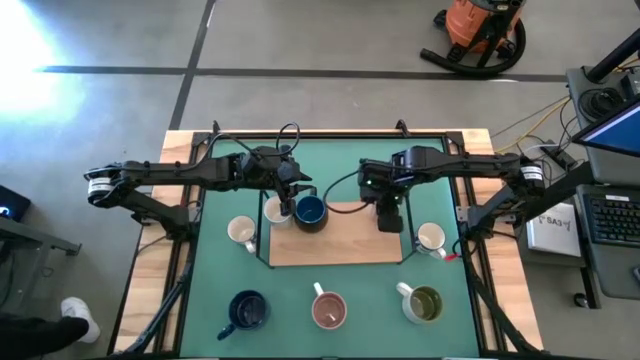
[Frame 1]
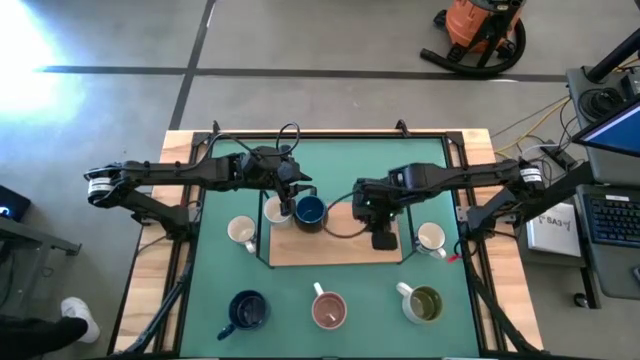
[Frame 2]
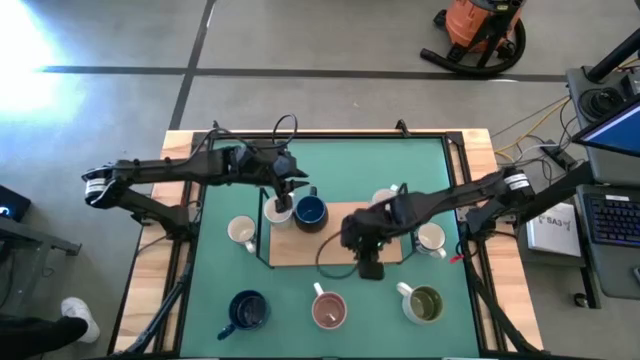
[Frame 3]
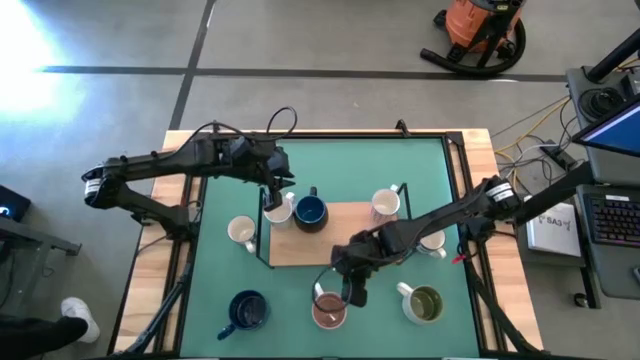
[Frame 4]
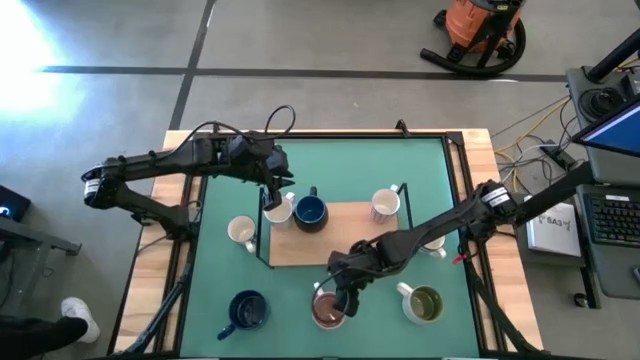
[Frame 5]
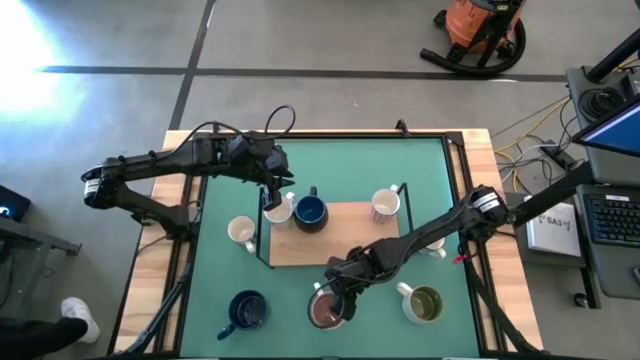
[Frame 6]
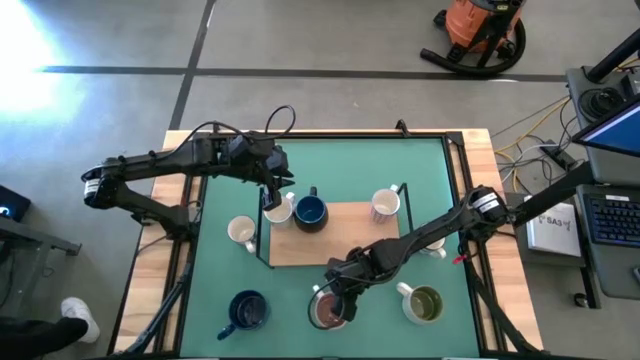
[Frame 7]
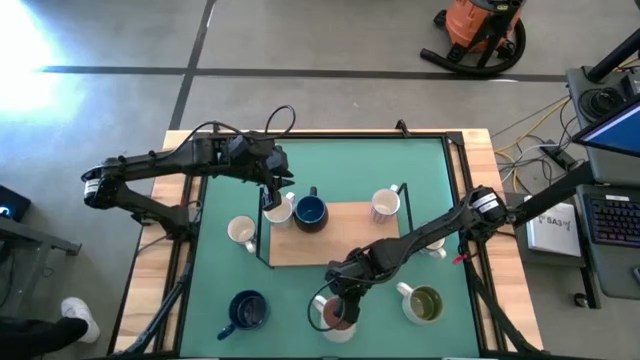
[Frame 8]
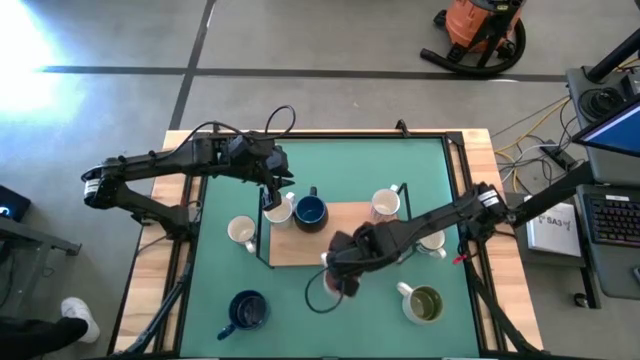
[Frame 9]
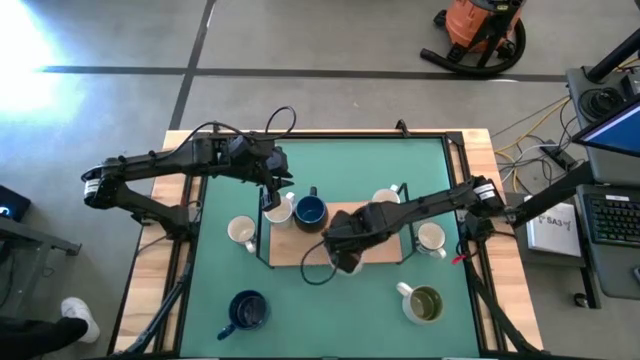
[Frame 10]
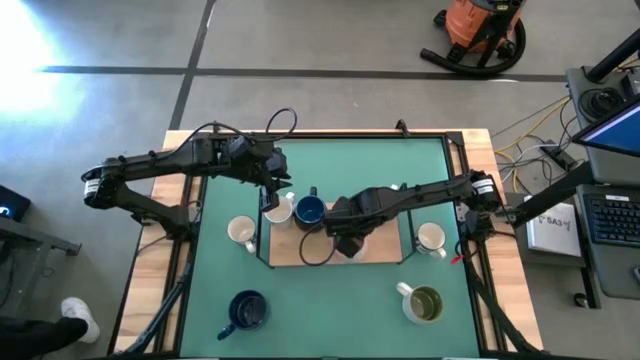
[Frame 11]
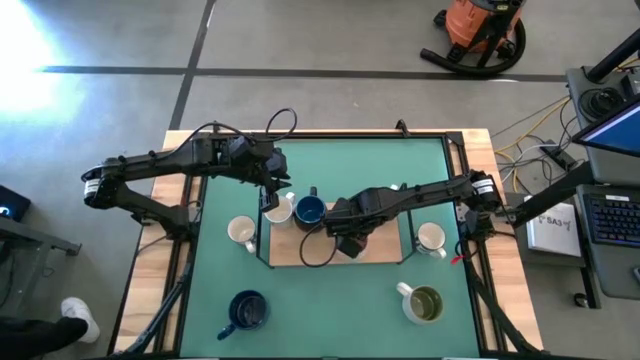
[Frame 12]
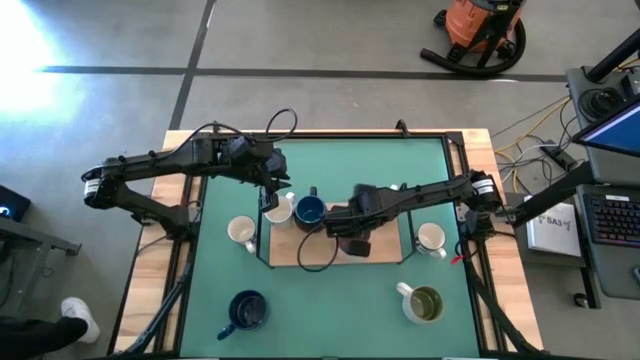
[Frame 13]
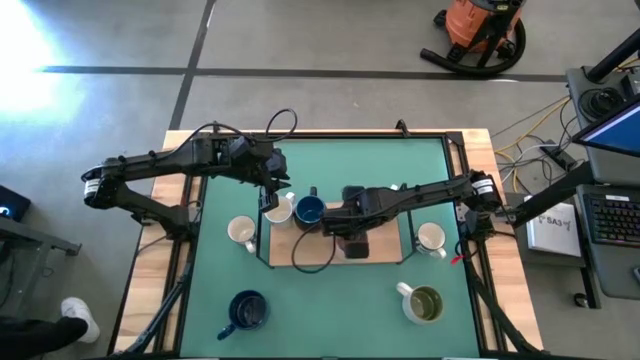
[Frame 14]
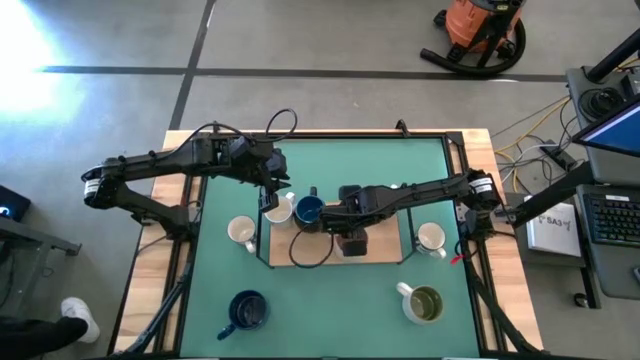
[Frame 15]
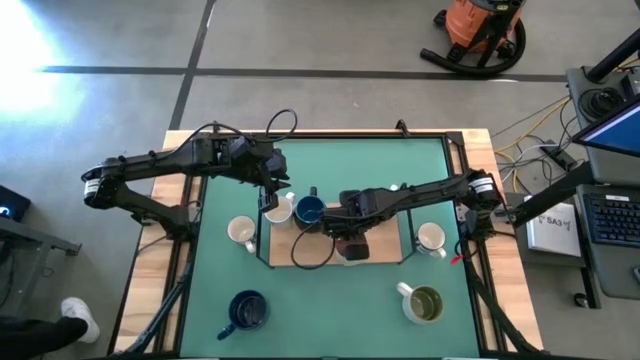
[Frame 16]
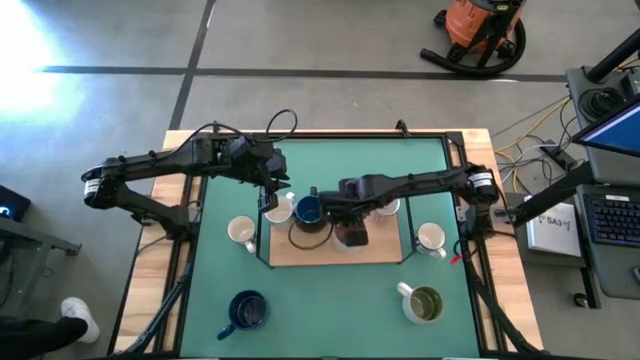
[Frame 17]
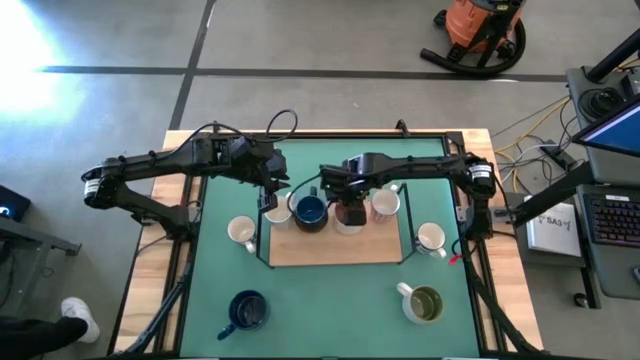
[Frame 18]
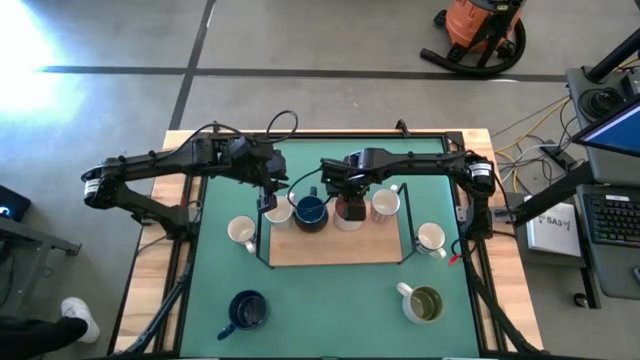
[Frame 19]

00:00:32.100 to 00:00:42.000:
Task: Place coffee mugs
Put the light orange mug on the shelf

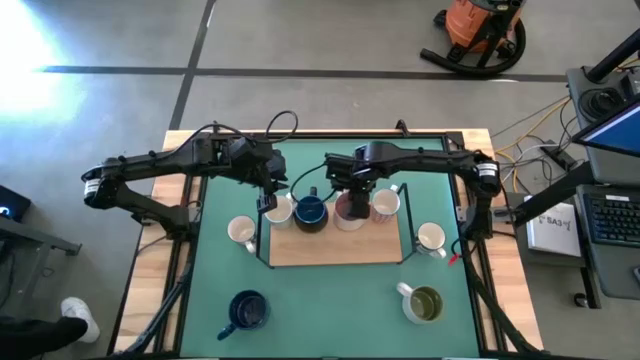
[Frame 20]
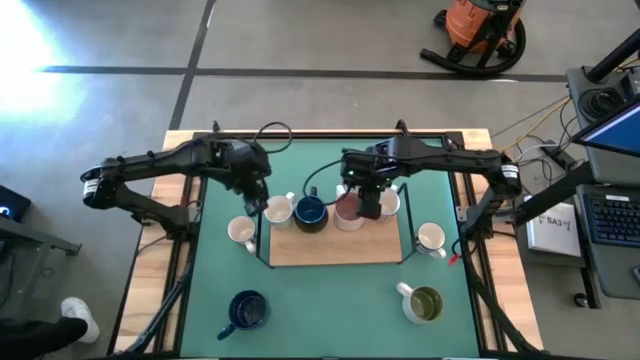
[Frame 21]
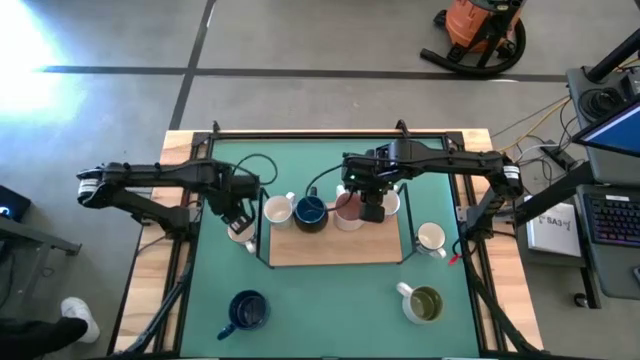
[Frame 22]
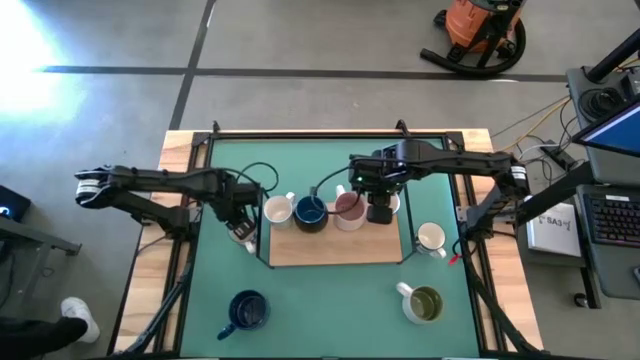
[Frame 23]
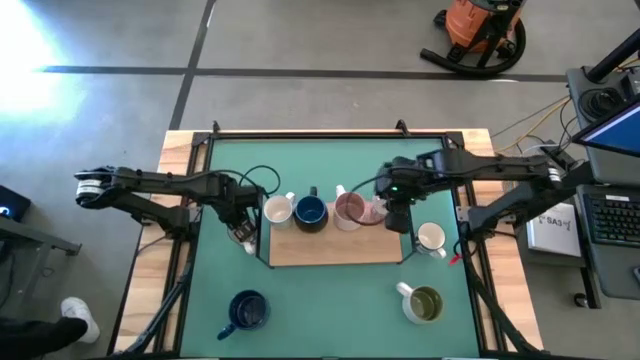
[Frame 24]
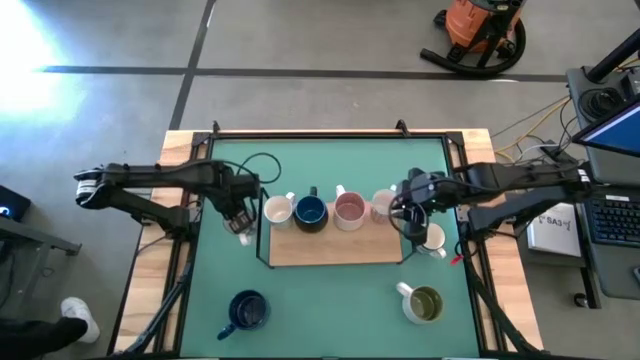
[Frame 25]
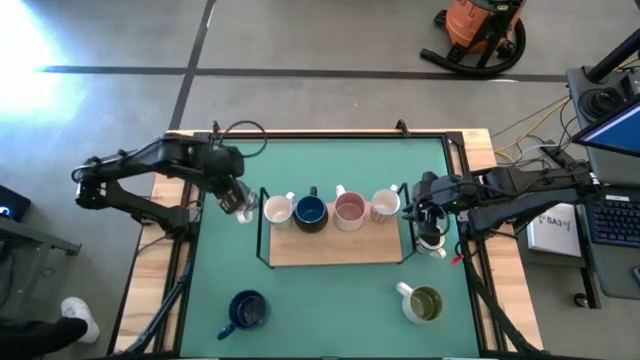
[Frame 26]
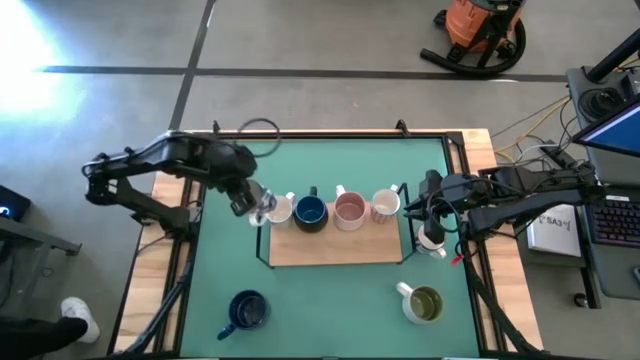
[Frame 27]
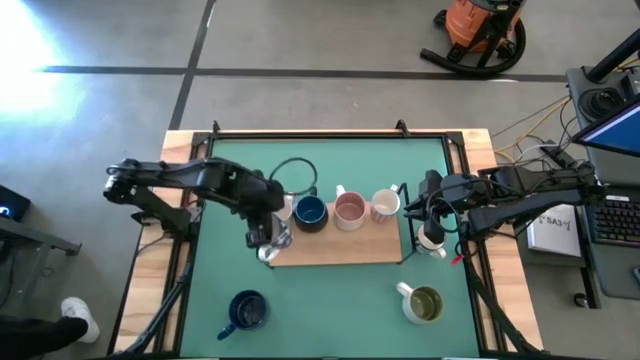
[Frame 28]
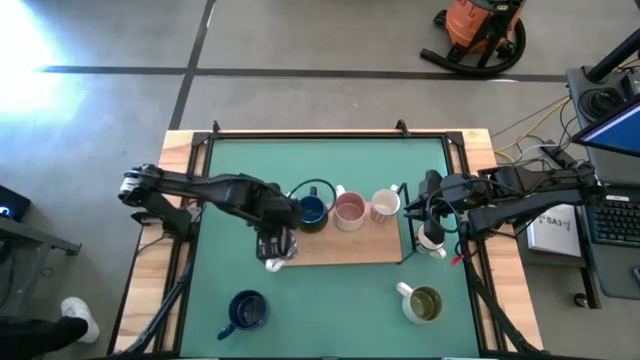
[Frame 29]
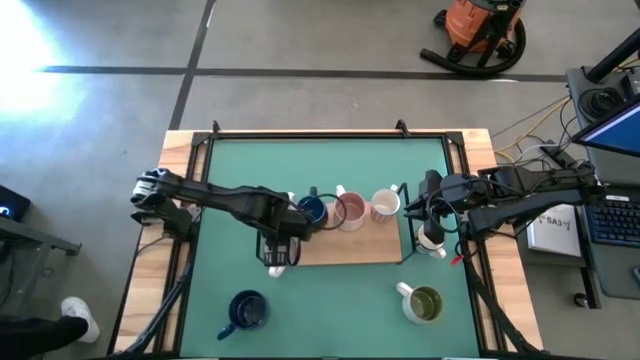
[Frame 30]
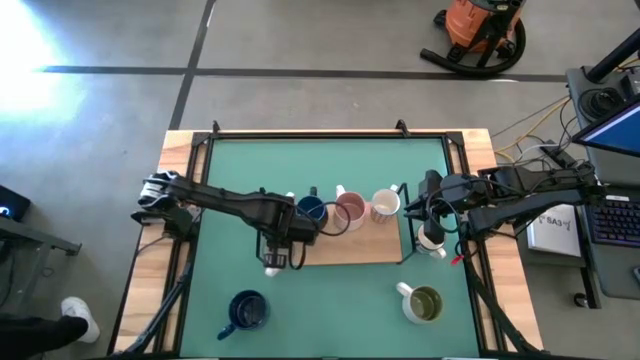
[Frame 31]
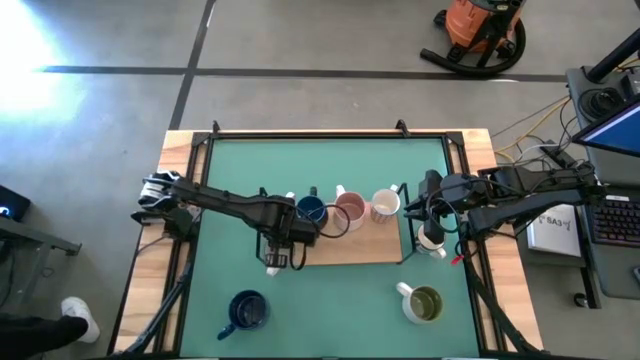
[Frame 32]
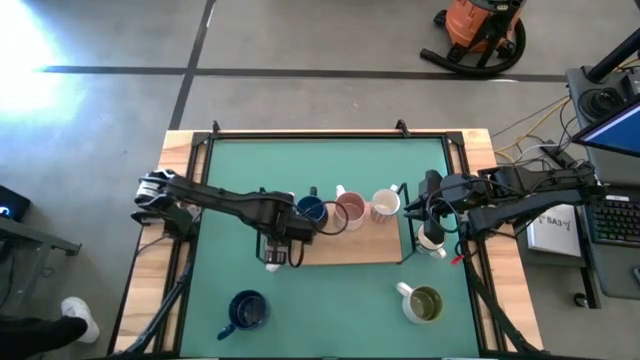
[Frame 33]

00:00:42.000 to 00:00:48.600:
Put the left blue patterned mug on the shelf

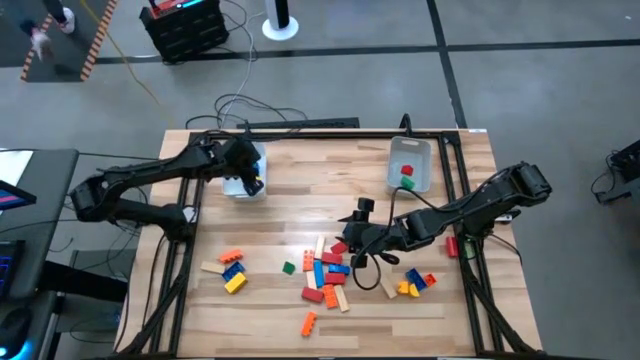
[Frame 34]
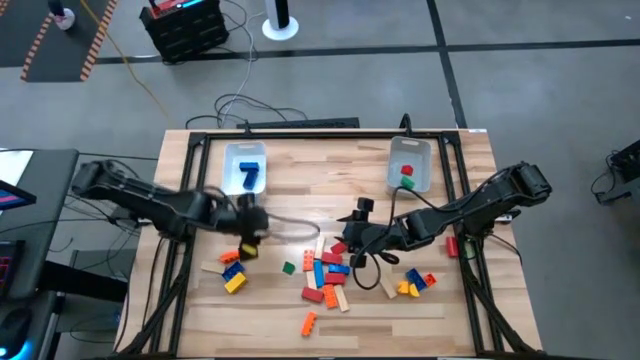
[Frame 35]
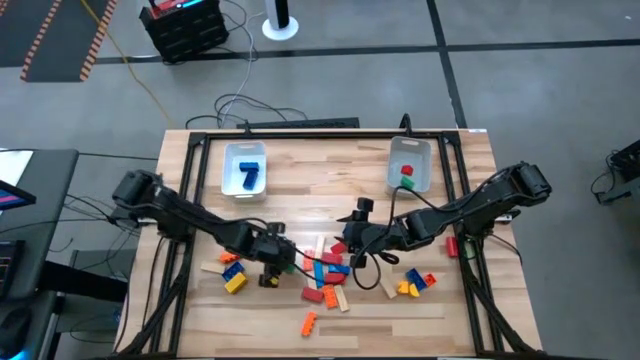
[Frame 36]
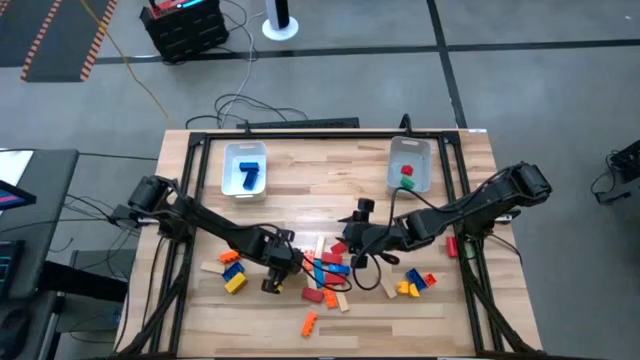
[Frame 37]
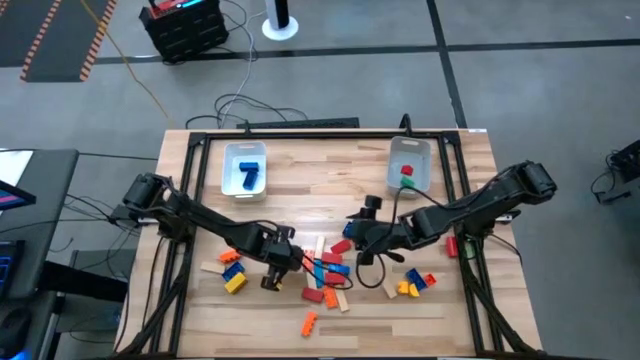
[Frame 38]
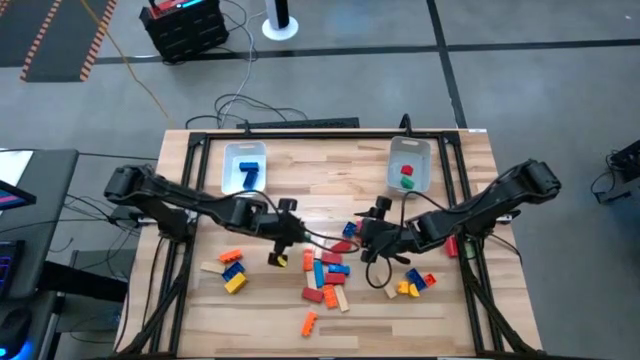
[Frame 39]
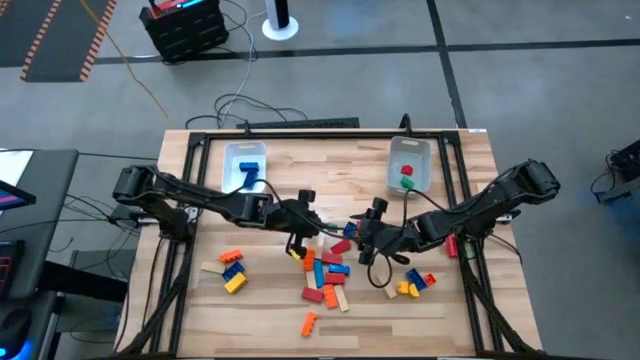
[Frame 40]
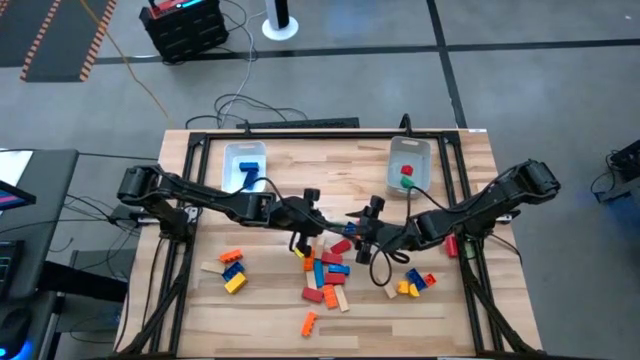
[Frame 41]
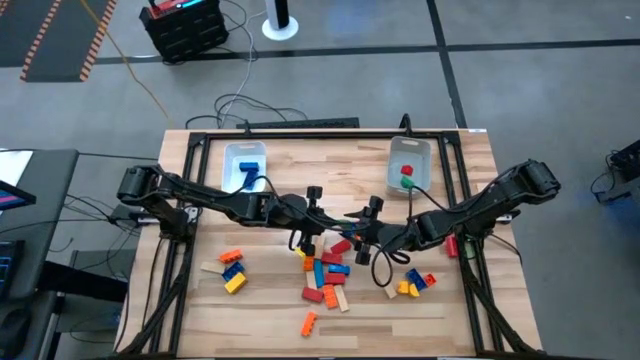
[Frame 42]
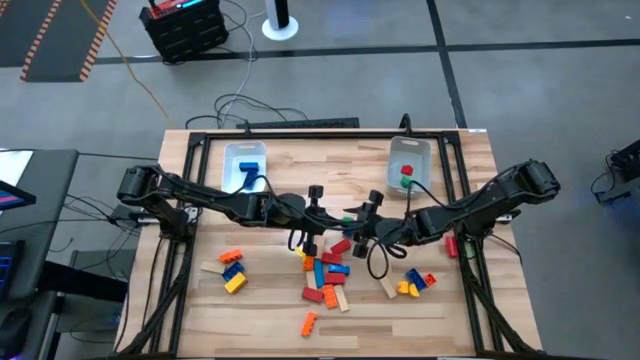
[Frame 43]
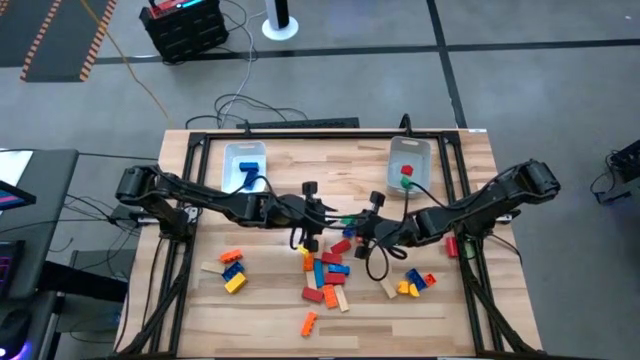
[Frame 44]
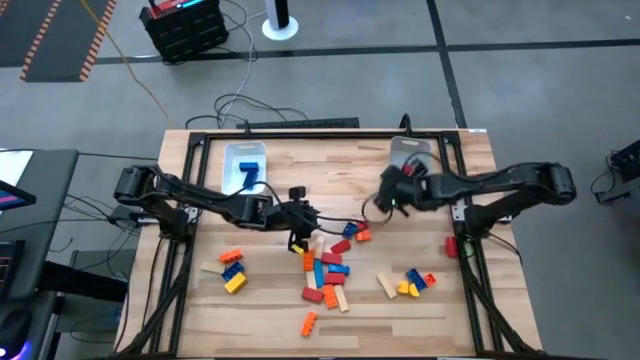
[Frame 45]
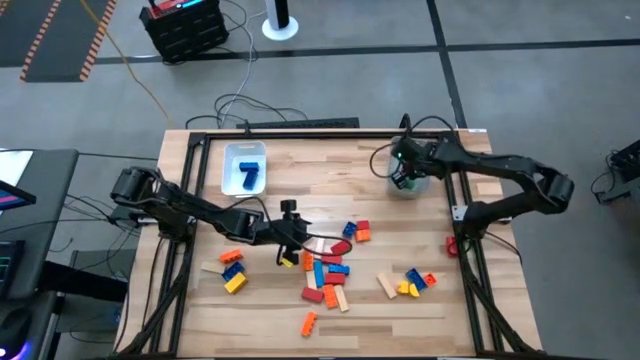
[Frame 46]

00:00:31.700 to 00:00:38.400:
Task: Sort blocks by size
Put the small green block into the gray bin
